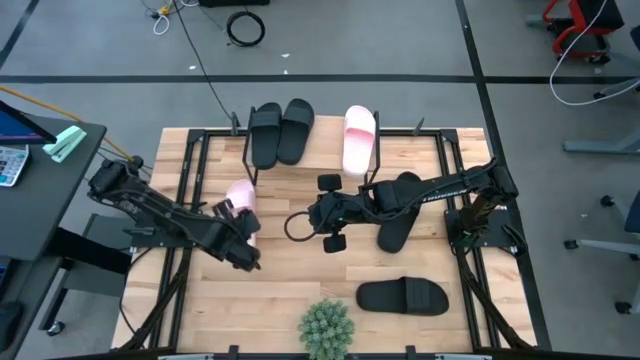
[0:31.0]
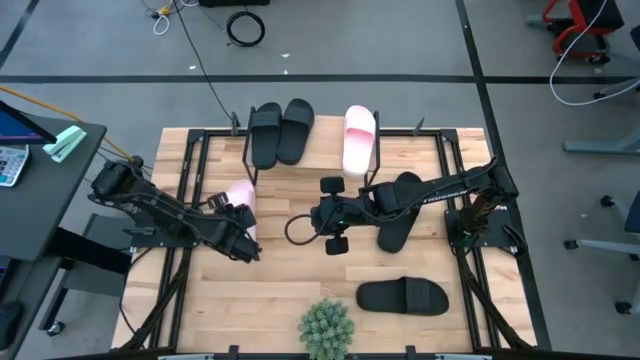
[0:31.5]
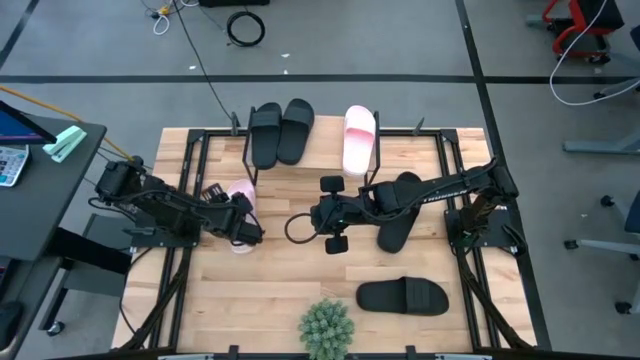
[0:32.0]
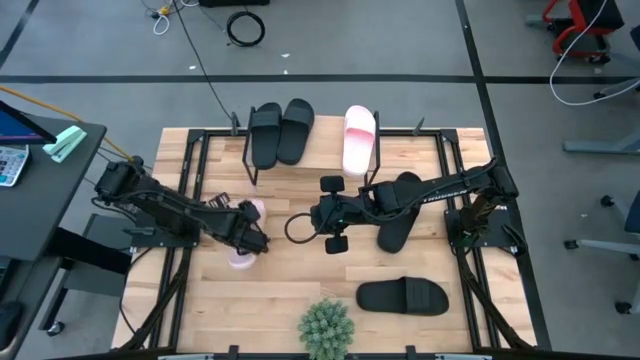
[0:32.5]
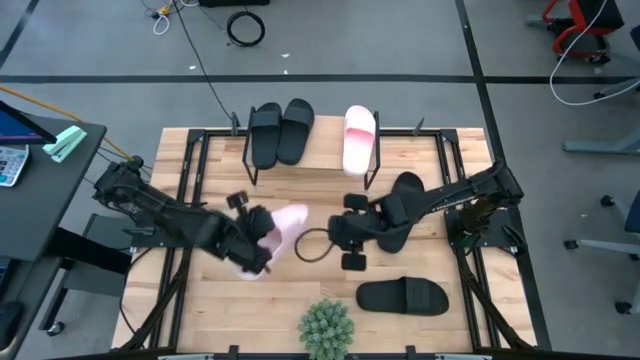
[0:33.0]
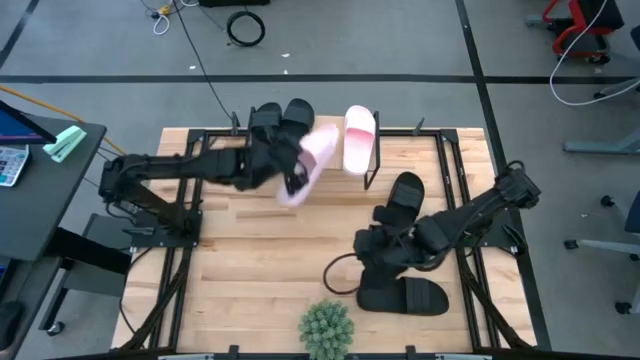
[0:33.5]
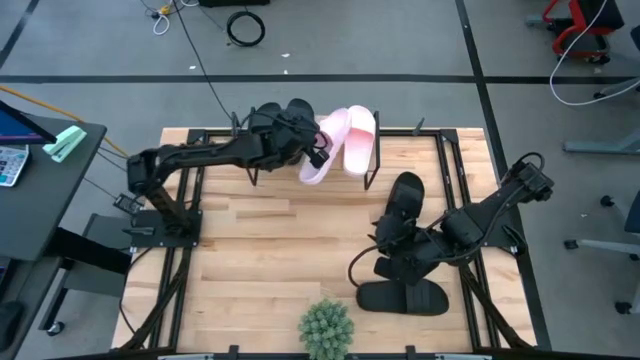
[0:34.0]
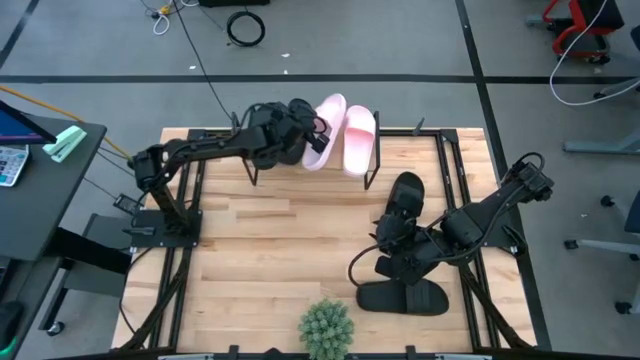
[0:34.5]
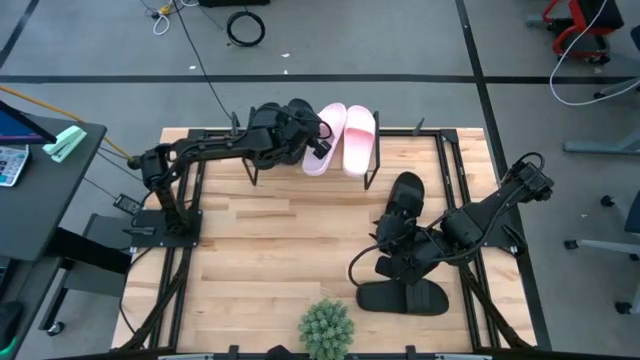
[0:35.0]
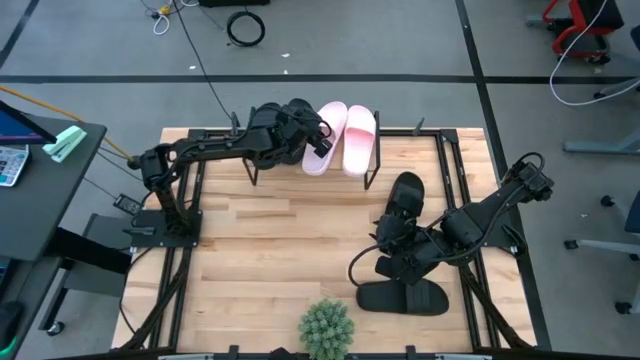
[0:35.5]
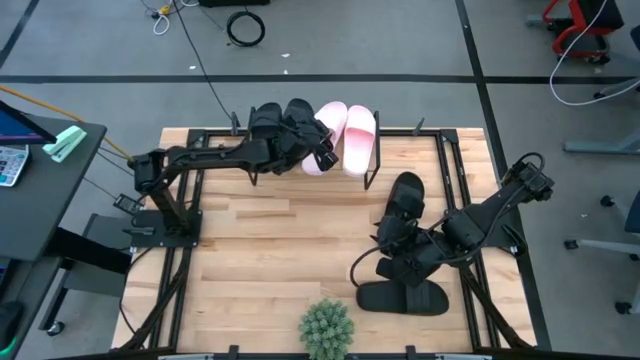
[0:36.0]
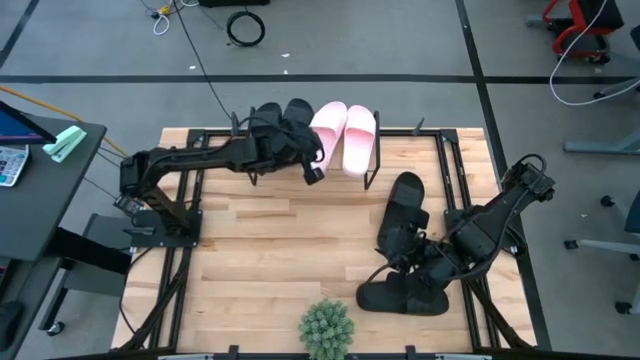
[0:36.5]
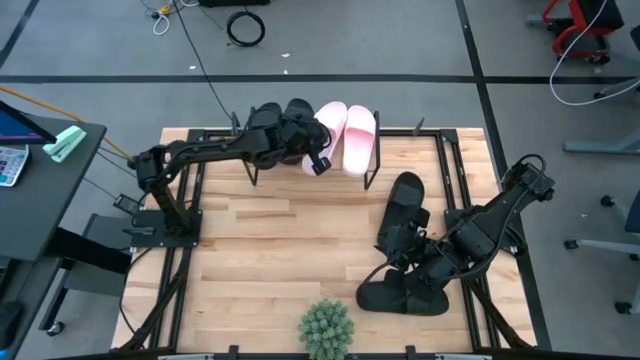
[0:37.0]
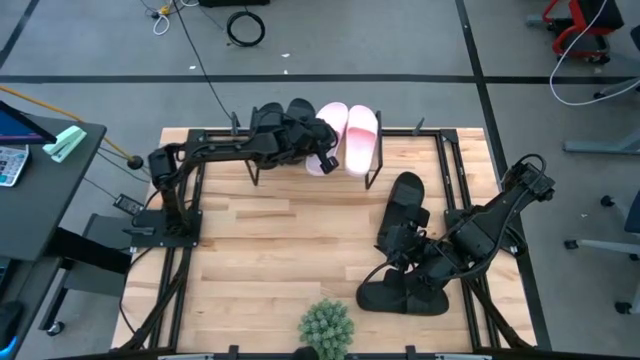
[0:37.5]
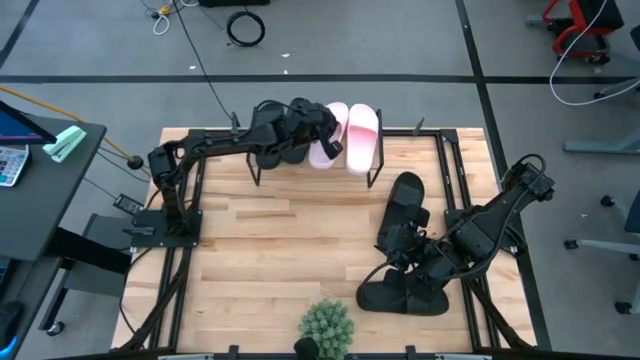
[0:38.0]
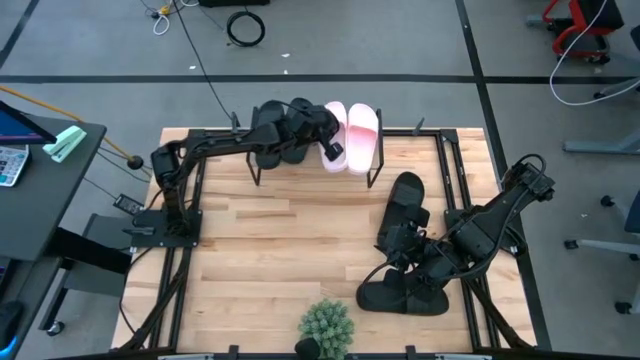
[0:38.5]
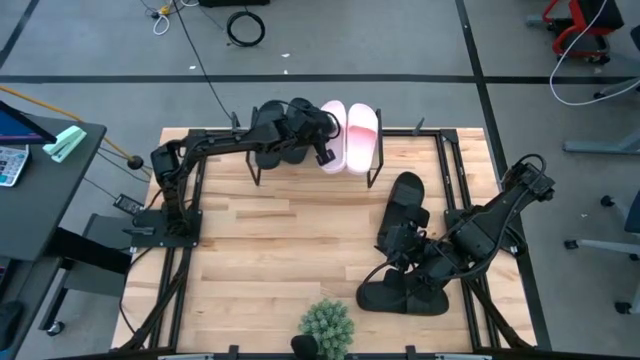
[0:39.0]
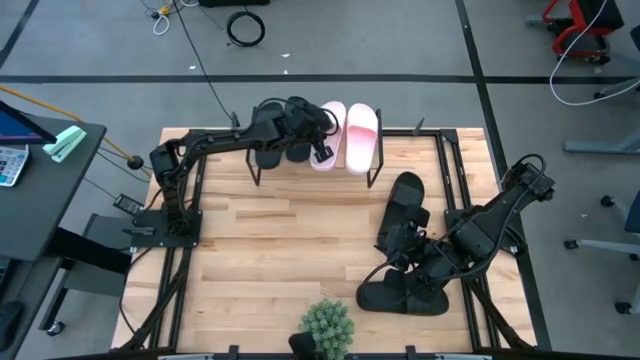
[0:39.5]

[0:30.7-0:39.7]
Task: Pick and place slides into the shelf
Put the pink slides on the shelf

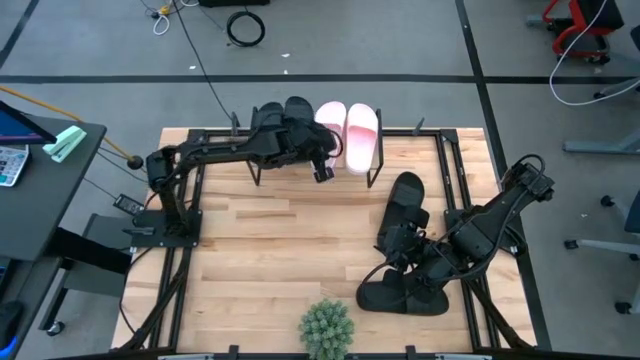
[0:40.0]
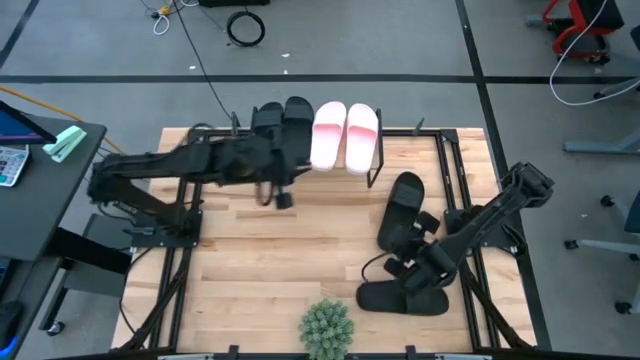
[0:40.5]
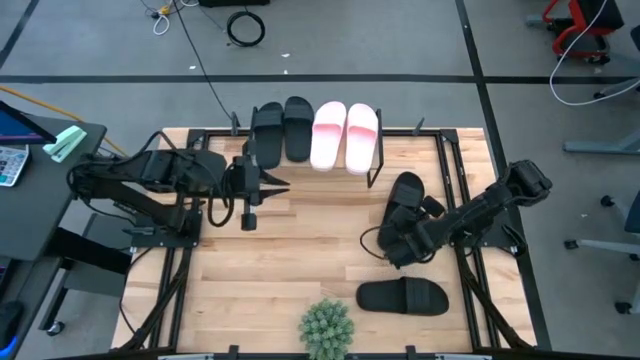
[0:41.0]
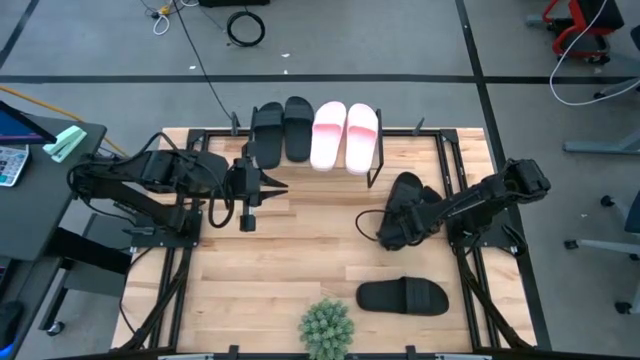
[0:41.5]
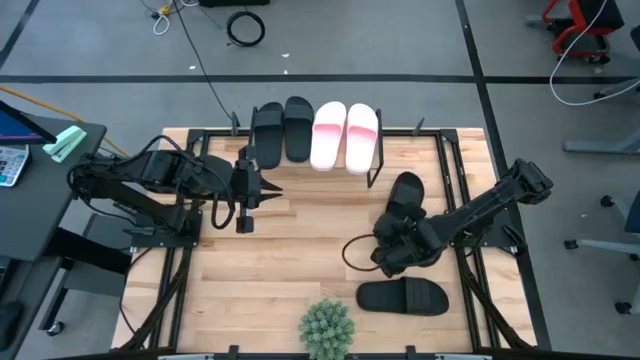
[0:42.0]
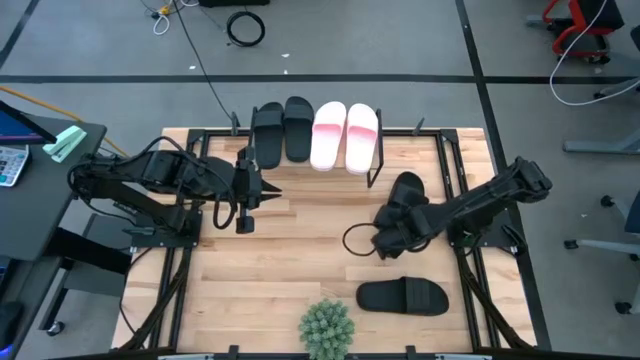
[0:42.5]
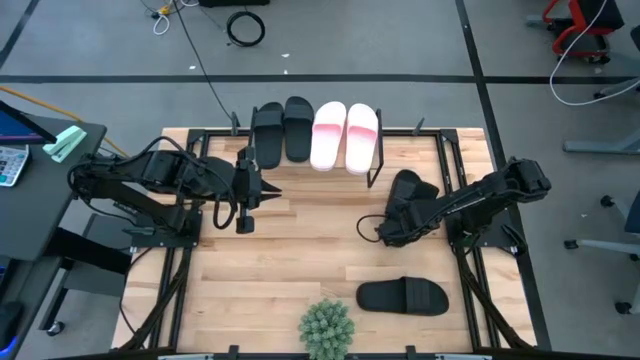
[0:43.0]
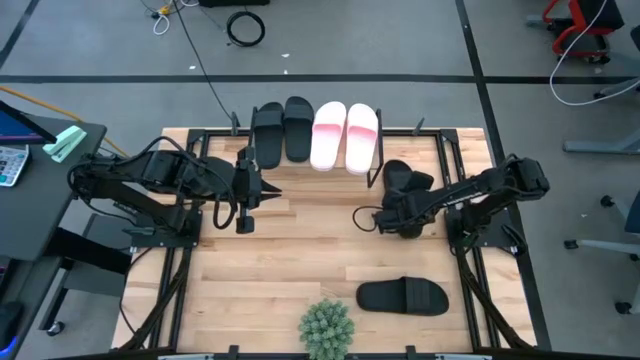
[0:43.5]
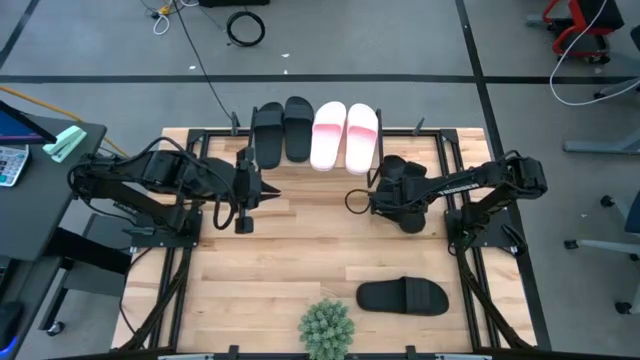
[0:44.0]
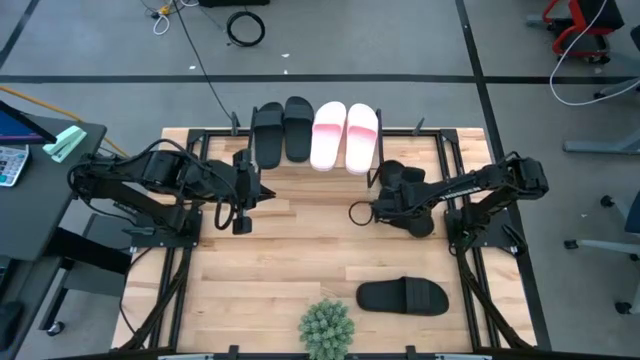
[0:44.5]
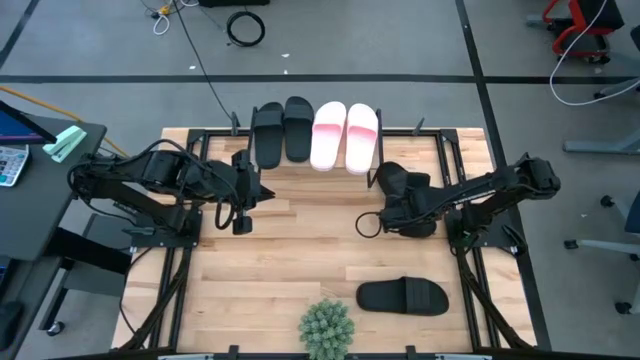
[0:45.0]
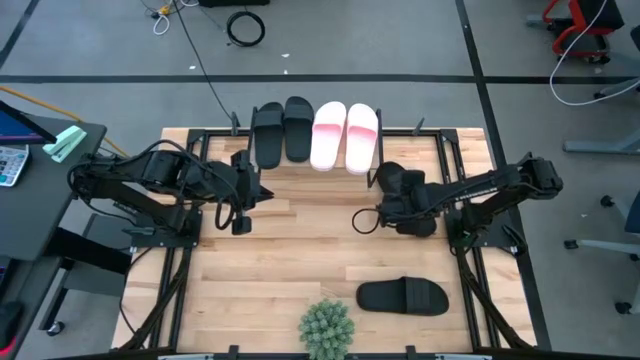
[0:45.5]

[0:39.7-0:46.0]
Put the black slides under the shelf

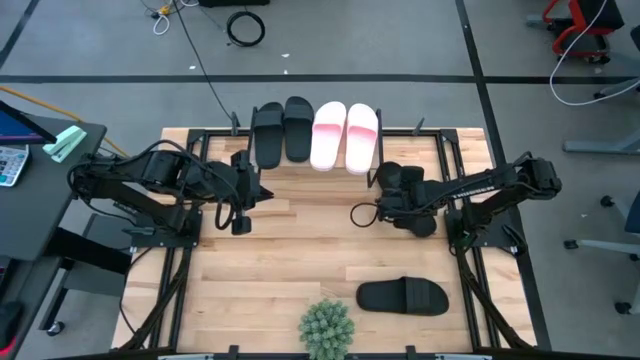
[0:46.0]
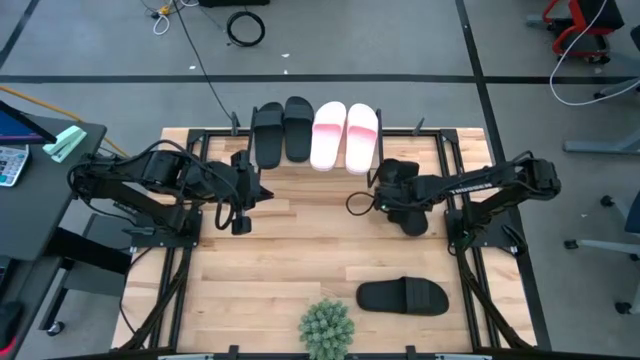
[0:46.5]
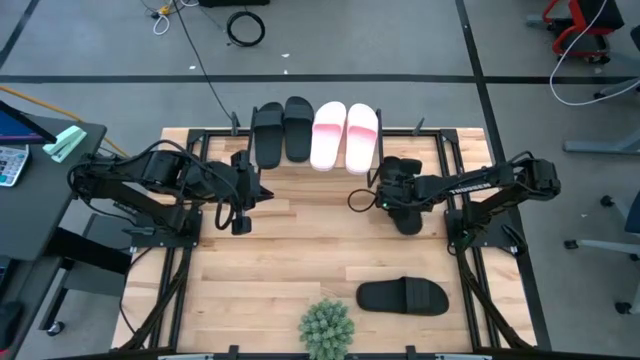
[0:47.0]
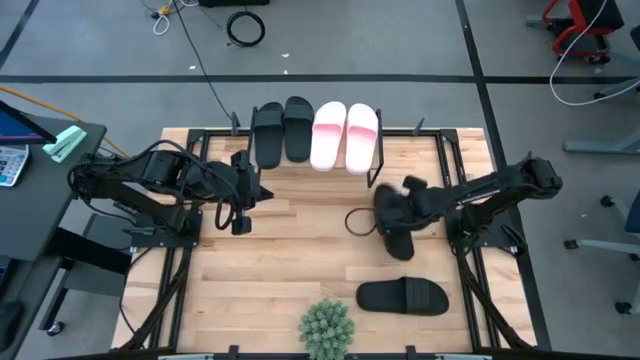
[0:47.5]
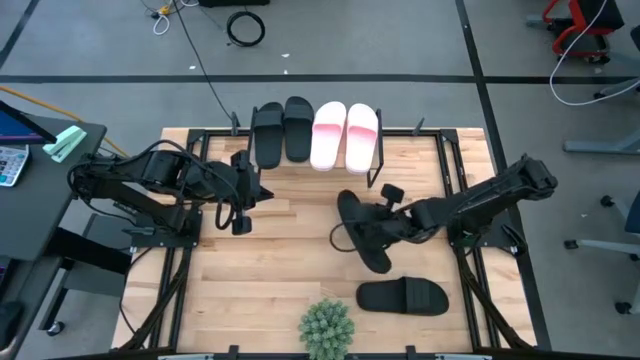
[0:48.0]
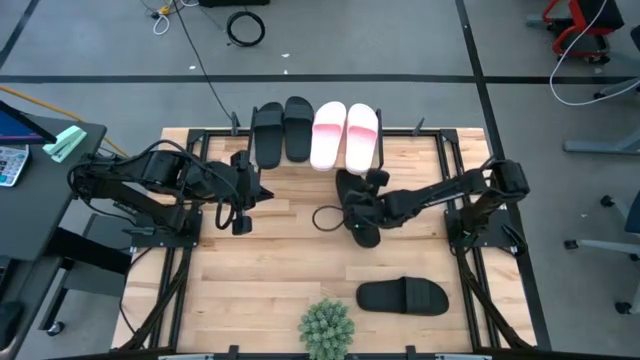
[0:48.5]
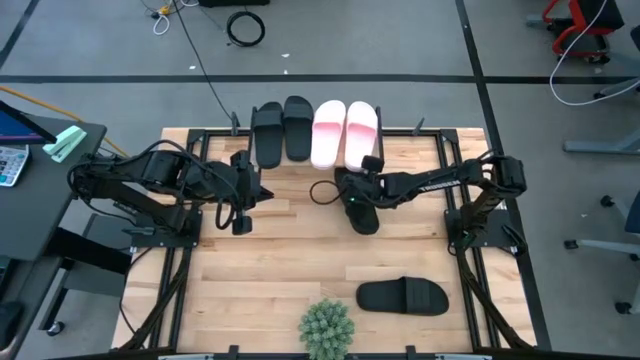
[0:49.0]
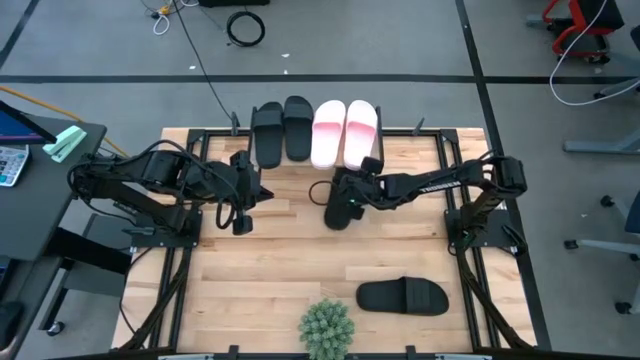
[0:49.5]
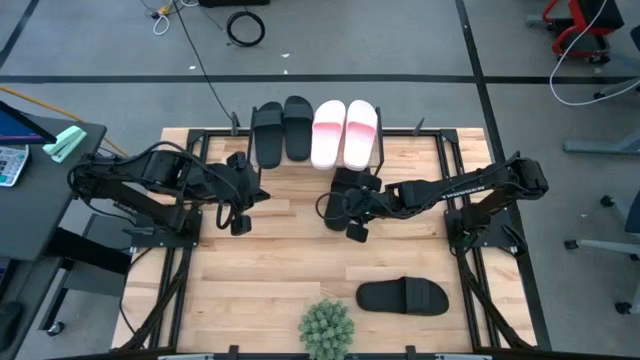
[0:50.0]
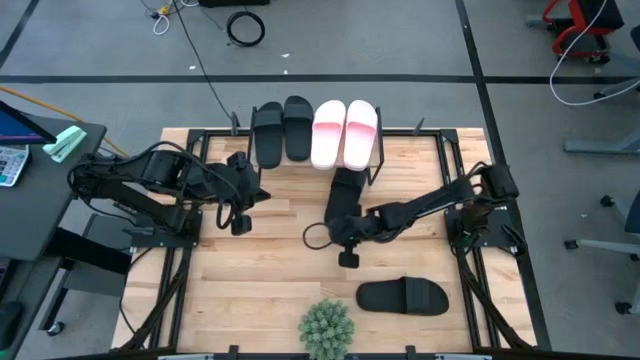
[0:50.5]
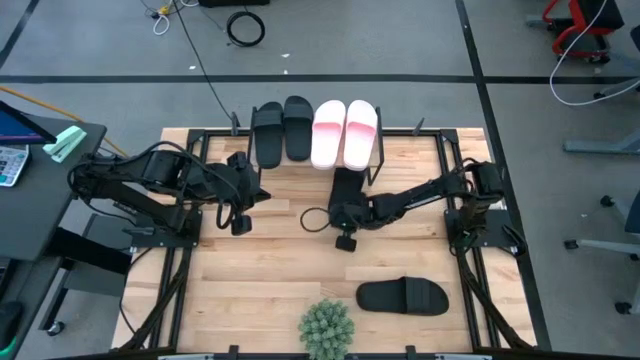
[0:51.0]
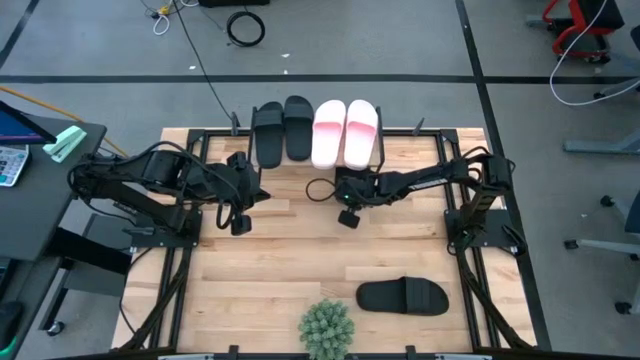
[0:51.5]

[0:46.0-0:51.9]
Put the black slides under the shelf
